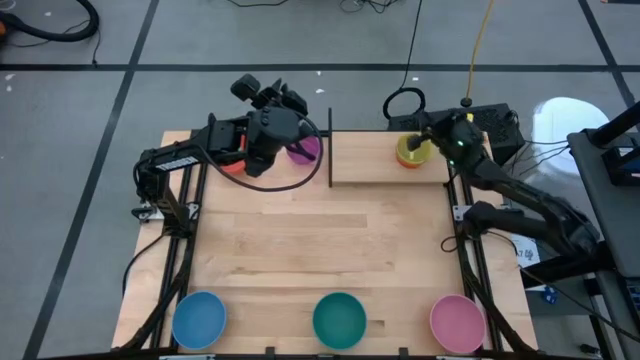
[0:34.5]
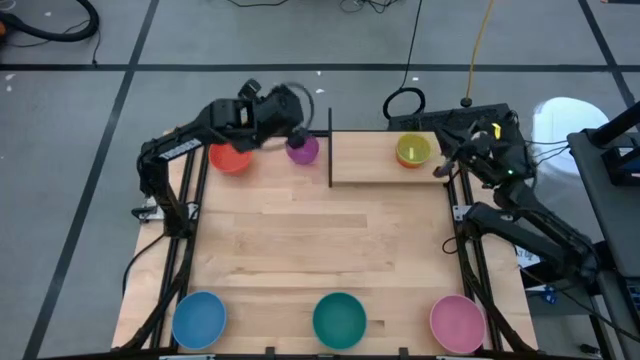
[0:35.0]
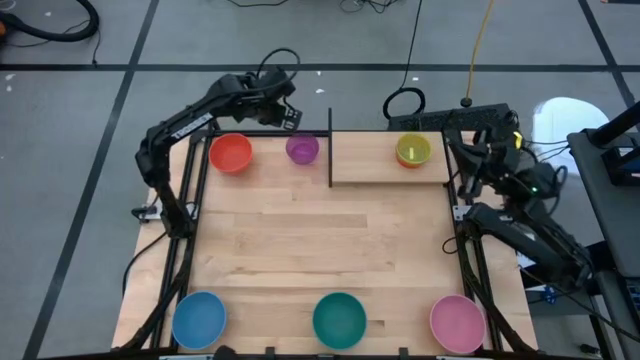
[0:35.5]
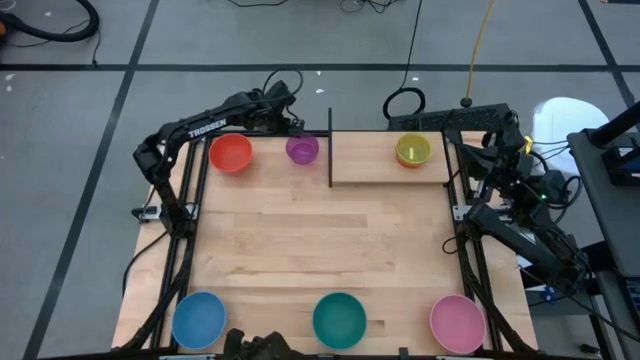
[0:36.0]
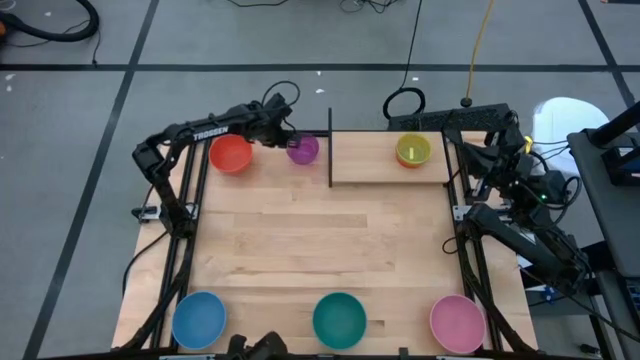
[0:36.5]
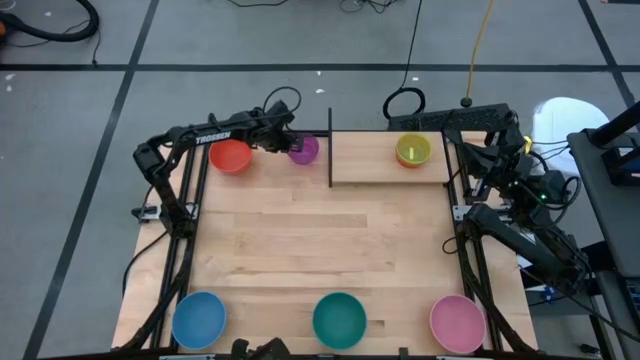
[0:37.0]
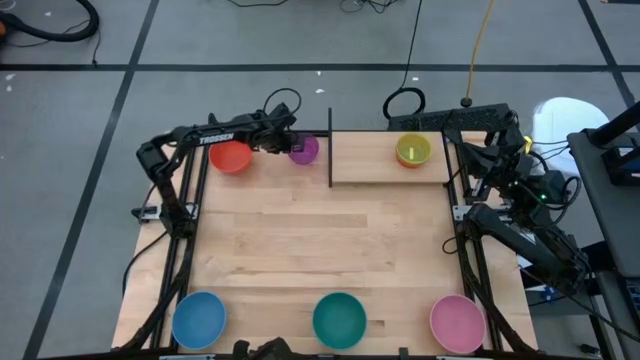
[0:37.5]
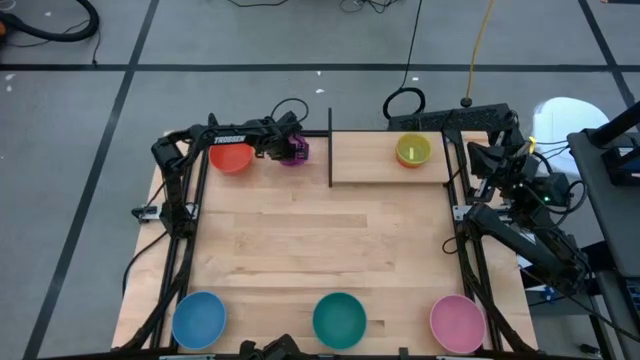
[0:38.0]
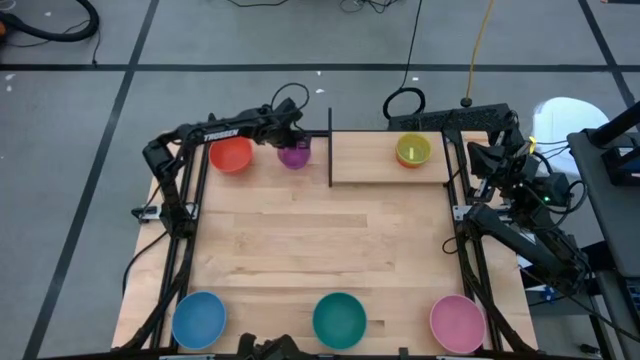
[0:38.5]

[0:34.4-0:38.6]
Task: Place and stack bowls onto a shelf
Stack the small purple bowl on top of the small yellow bowl on the shelf

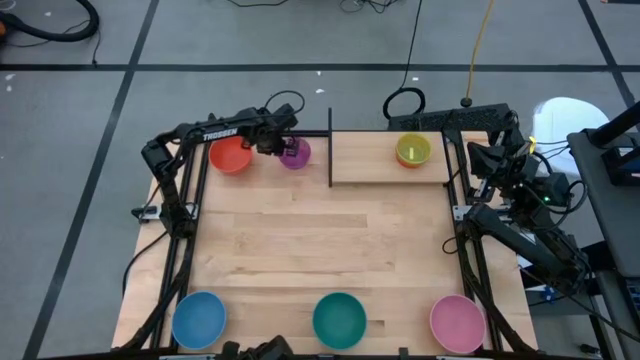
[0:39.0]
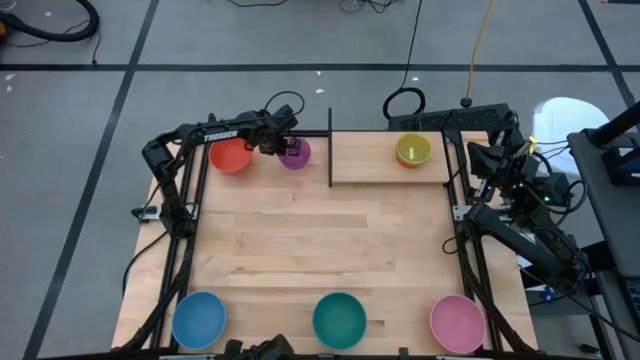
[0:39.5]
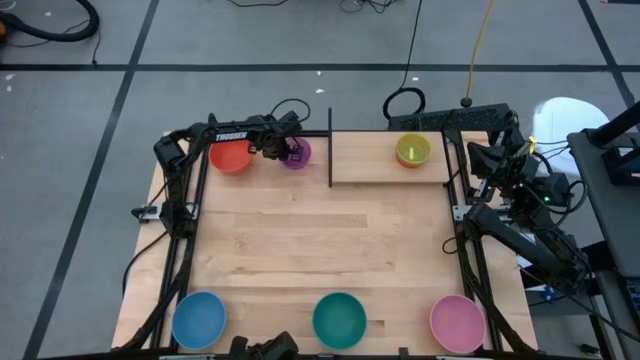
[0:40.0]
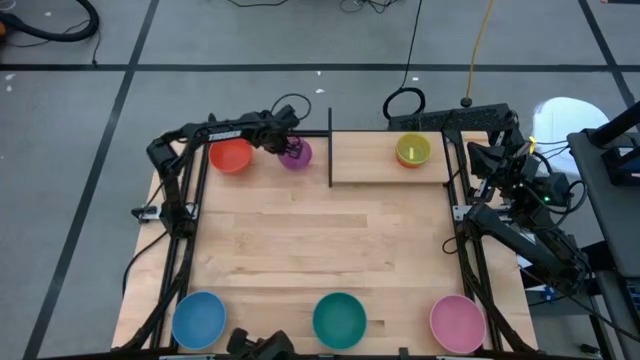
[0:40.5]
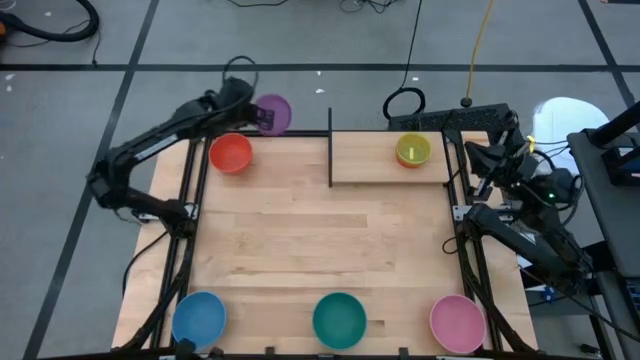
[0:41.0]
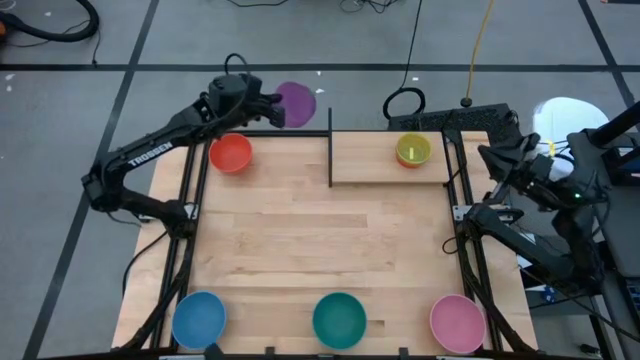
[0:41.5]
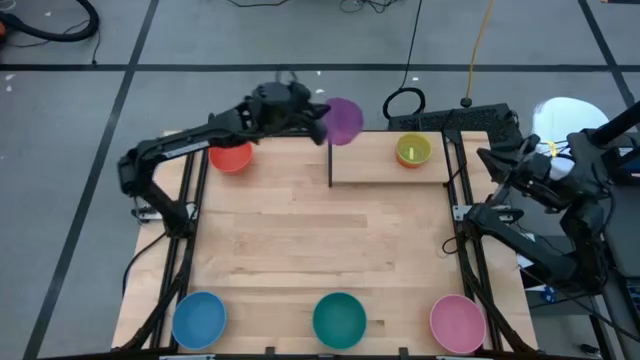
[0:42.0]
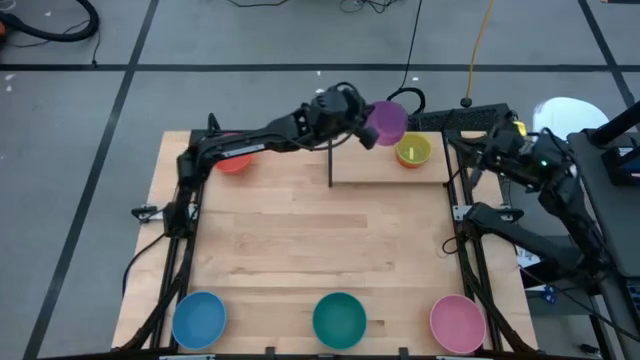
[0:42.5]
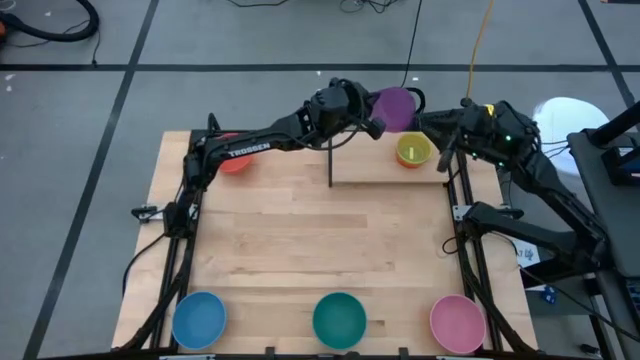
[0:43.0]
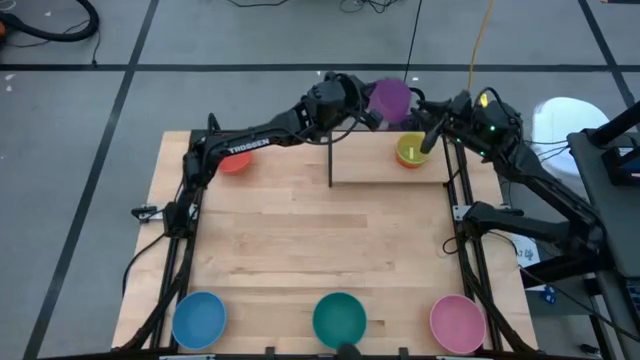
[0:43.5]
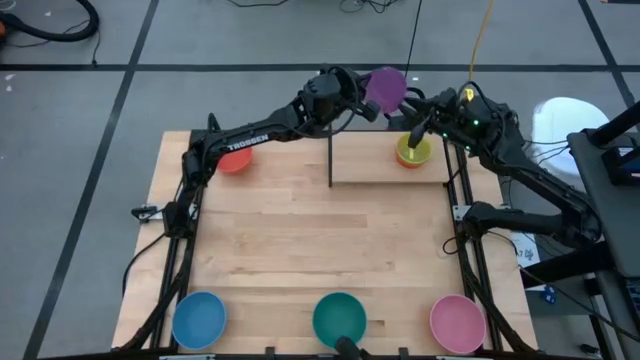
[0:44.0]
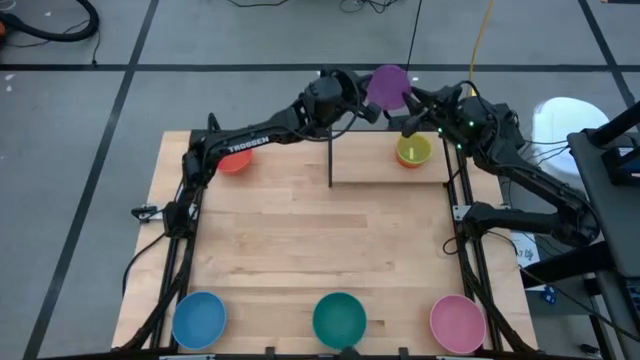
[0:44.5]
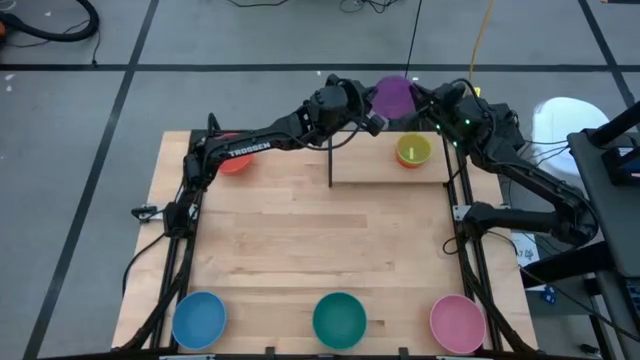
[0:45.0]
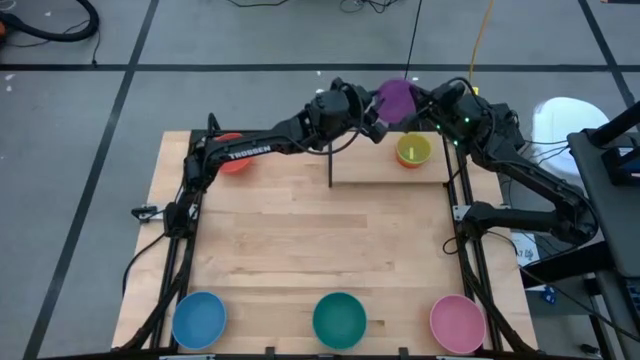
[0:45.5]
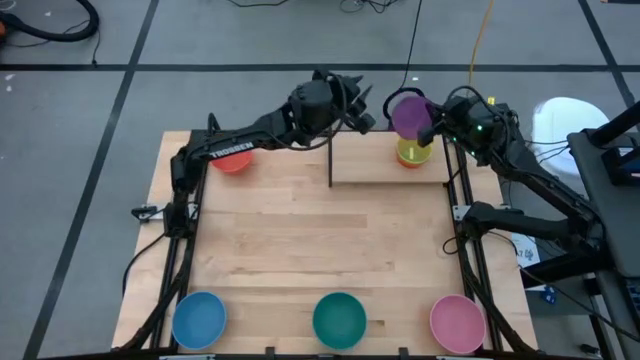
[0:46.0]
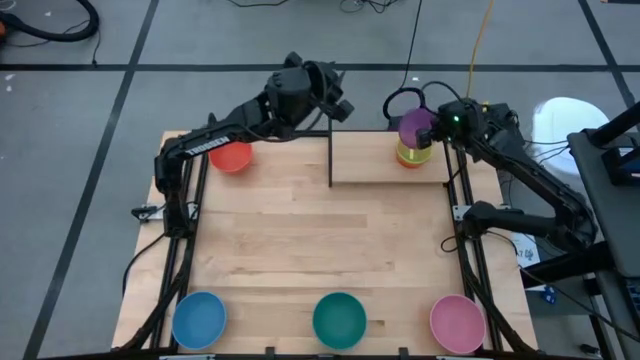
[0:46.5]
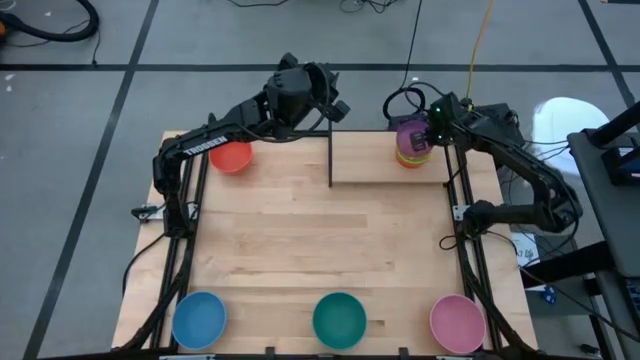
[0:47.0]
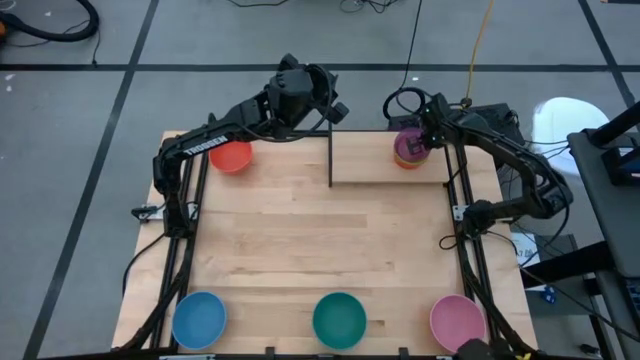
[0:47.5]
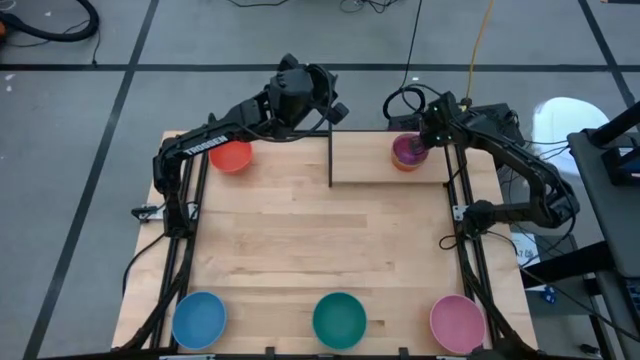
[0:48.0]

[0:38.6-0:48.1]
Stack the small purple bowl on top of the small yellow bowl on the shelf

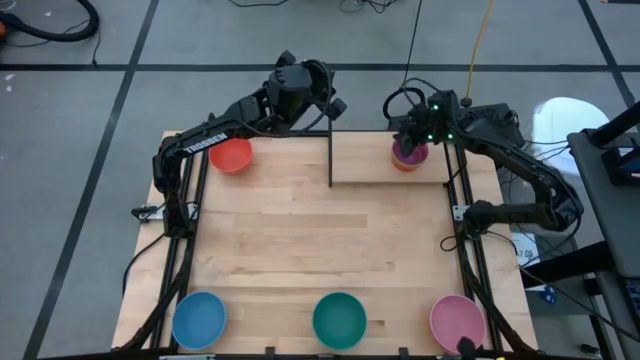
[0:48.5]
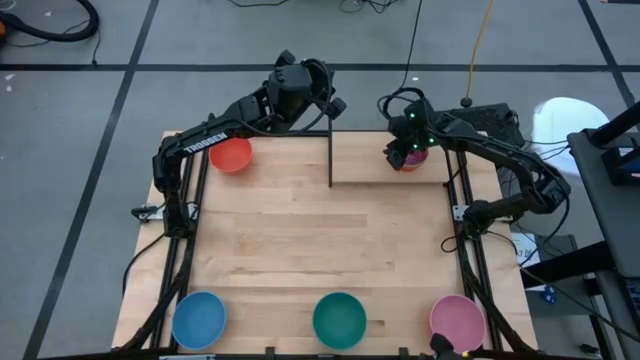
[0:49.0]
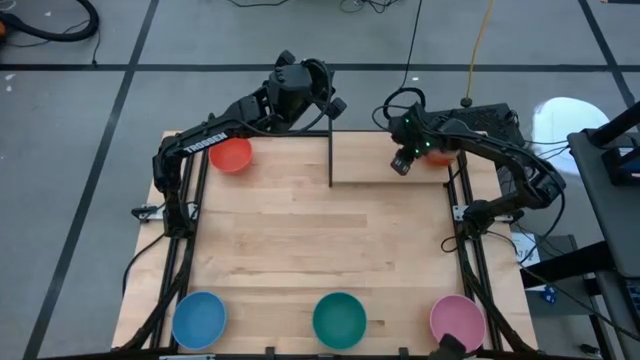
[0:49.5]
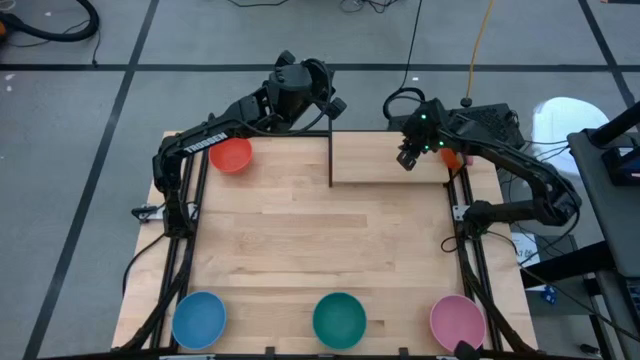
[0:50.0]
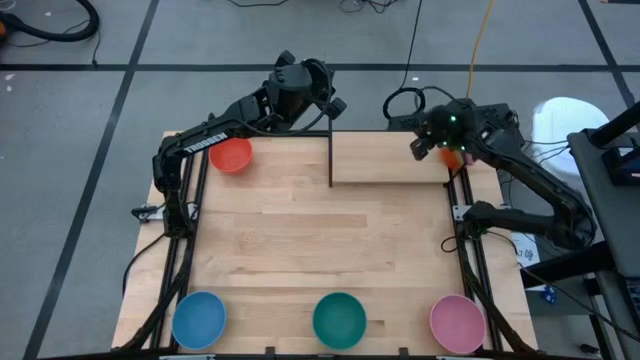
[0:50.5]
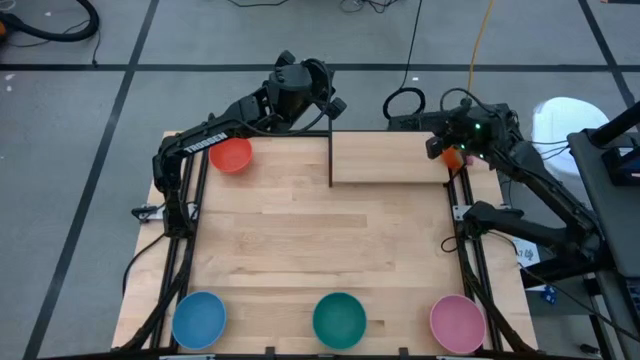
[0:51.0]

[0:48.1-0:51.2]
Adjust the stacked small bowls on the shelf

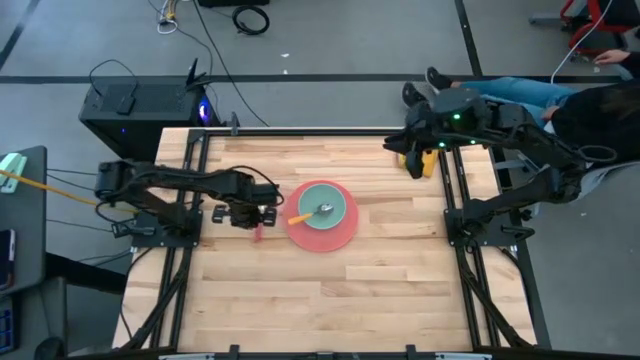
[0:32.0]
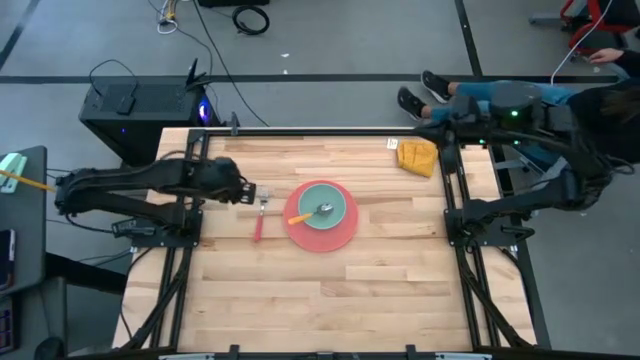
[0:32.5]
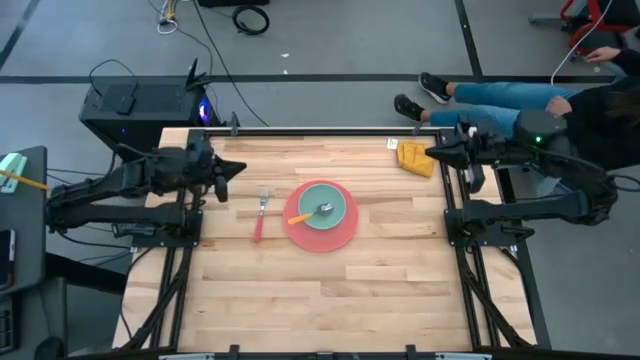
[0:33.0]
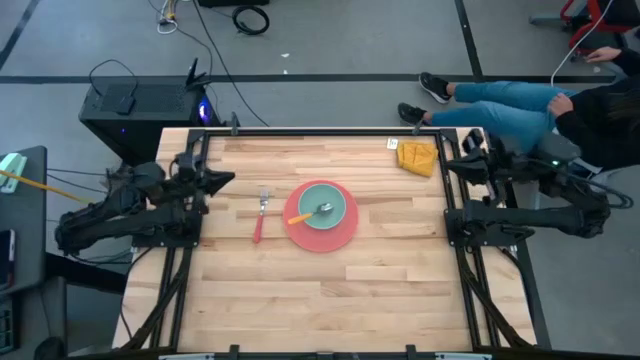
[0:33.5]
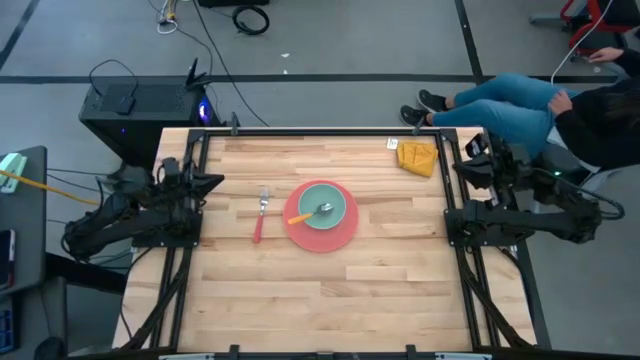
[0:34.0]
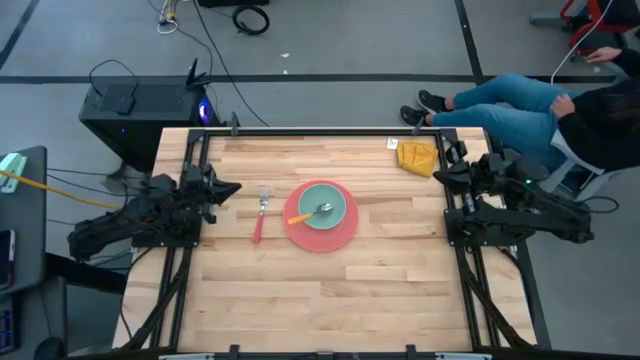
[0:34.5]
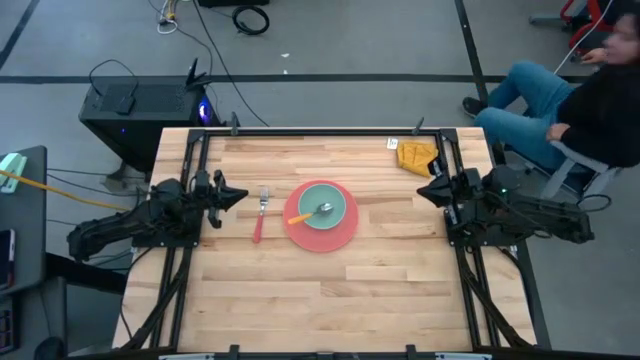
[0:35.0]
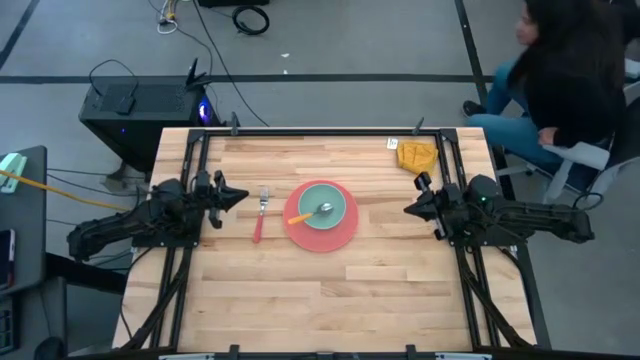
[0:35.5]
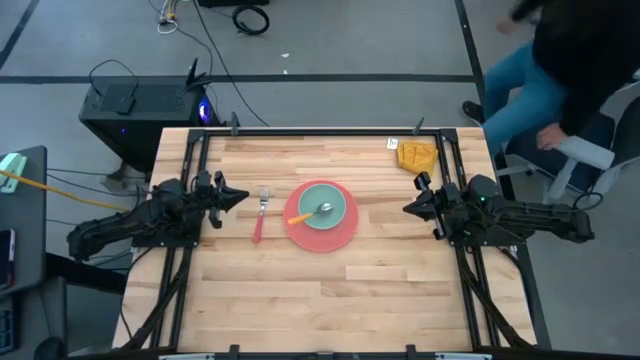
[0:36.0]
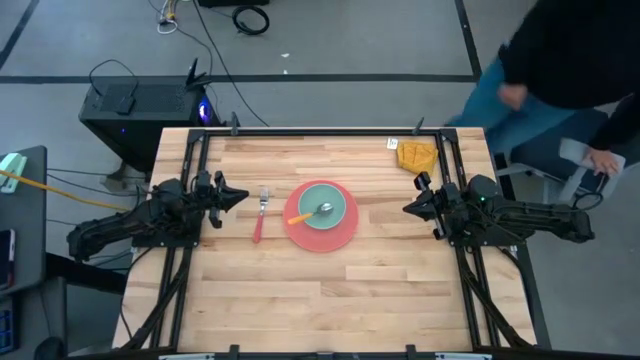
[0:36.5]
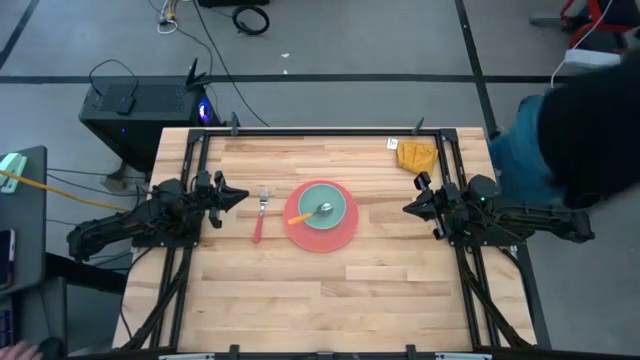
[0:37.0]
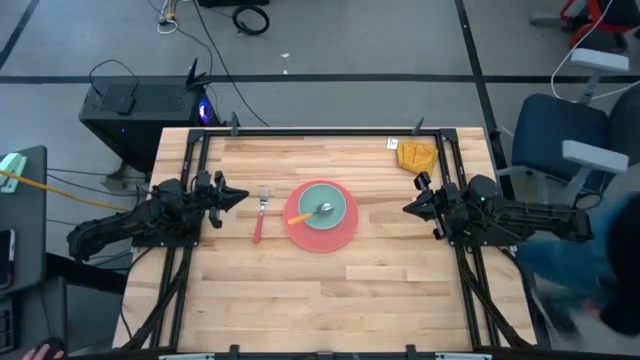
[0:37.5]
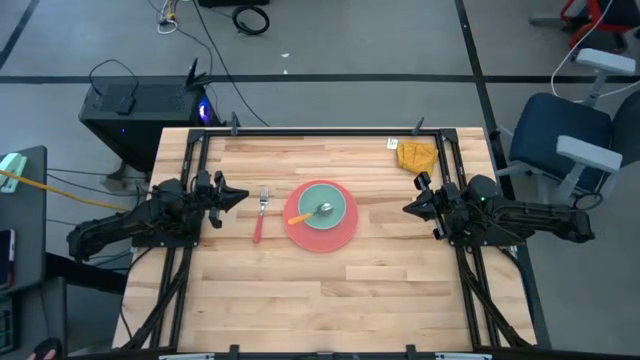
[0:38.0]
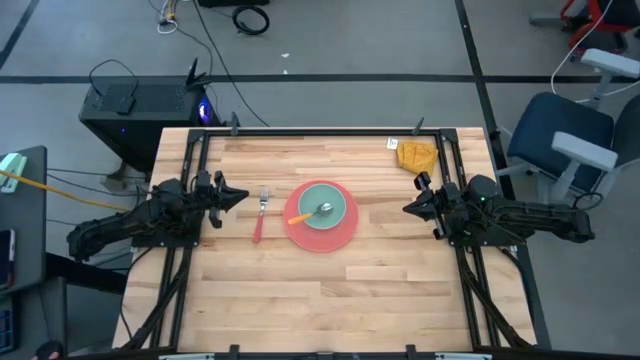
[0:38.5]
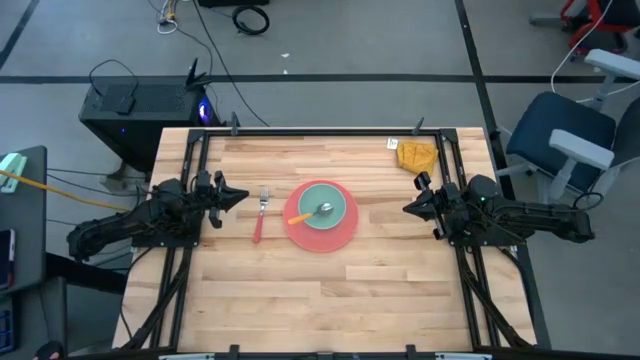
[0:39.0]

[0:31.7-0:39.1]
Task: Set table place
Return to Home Position
